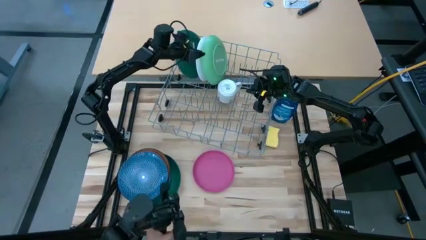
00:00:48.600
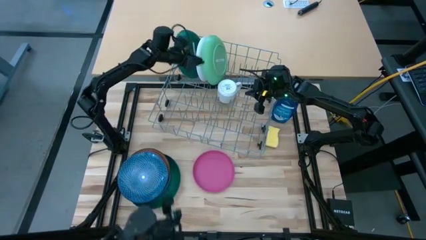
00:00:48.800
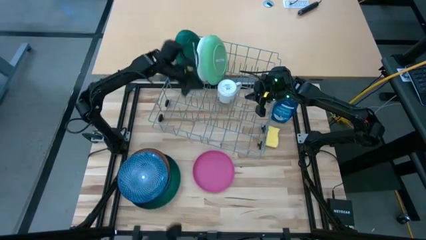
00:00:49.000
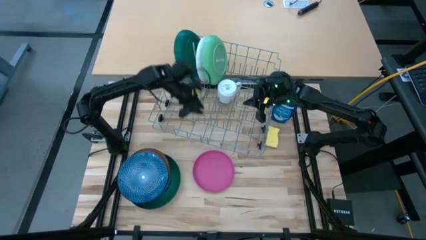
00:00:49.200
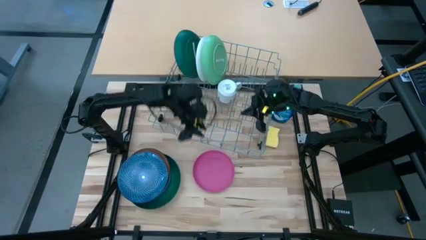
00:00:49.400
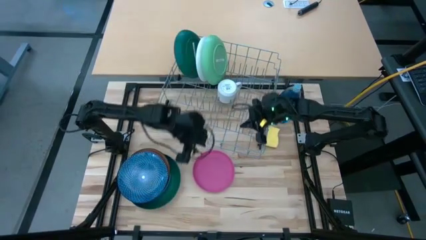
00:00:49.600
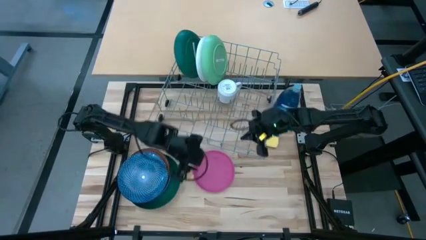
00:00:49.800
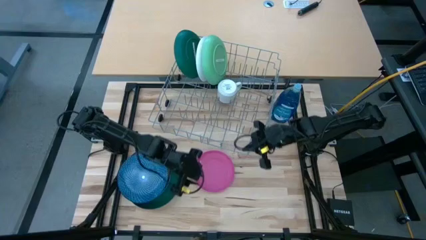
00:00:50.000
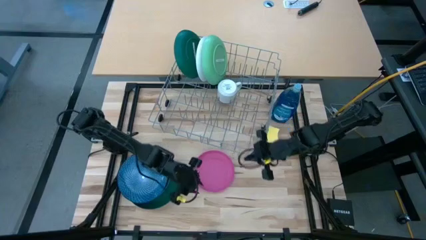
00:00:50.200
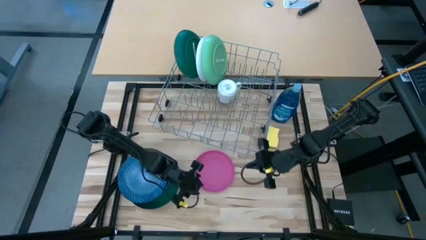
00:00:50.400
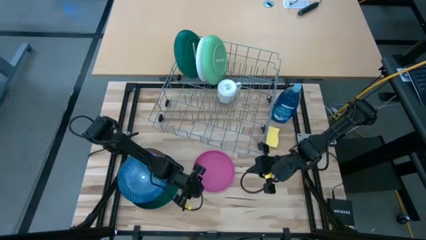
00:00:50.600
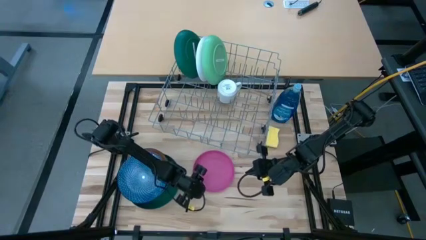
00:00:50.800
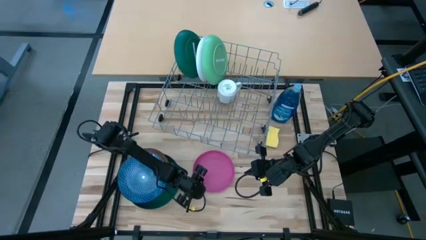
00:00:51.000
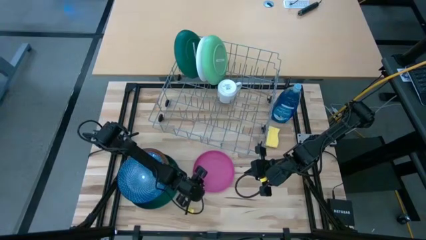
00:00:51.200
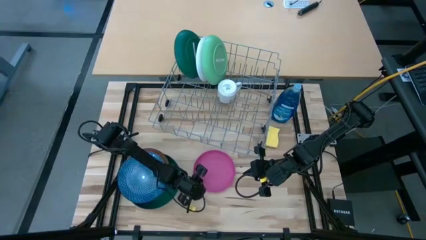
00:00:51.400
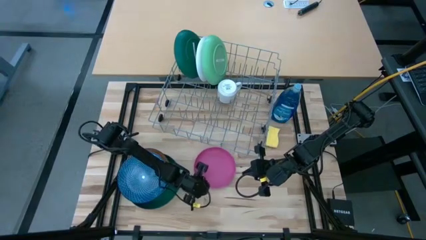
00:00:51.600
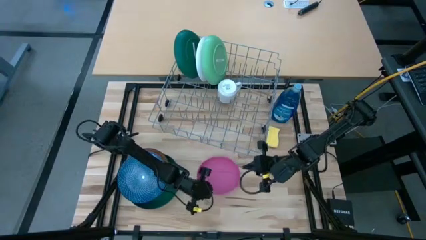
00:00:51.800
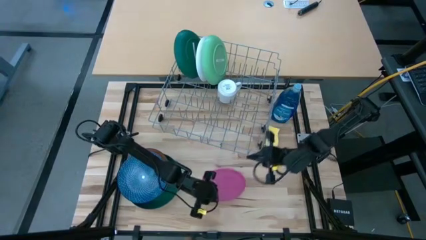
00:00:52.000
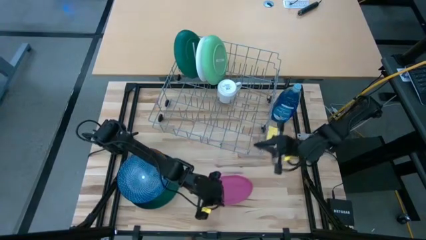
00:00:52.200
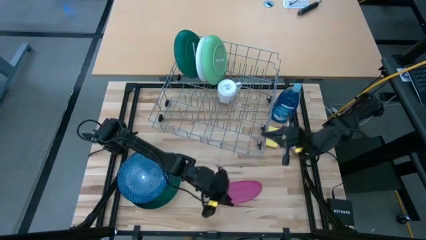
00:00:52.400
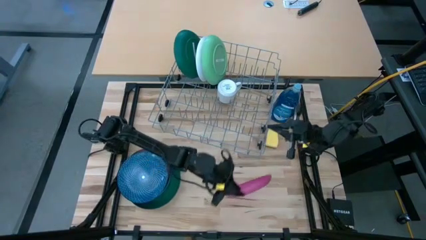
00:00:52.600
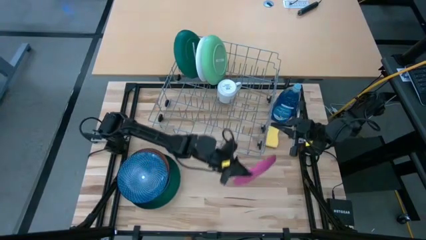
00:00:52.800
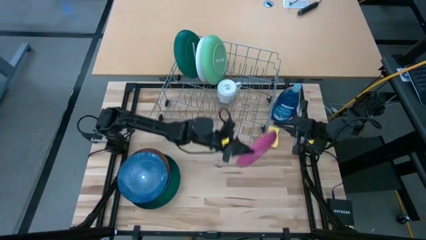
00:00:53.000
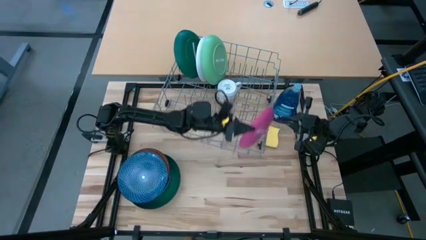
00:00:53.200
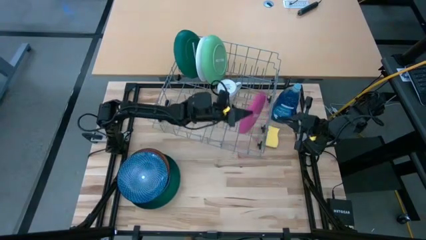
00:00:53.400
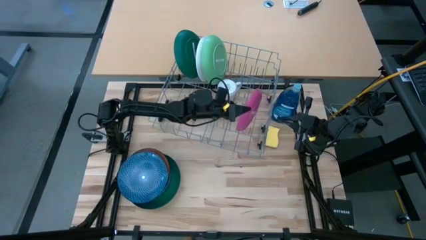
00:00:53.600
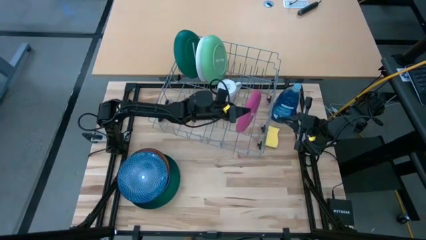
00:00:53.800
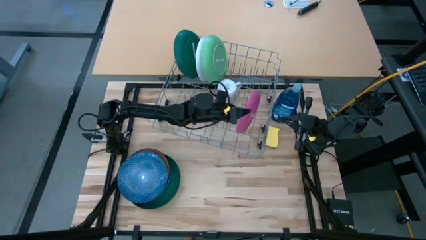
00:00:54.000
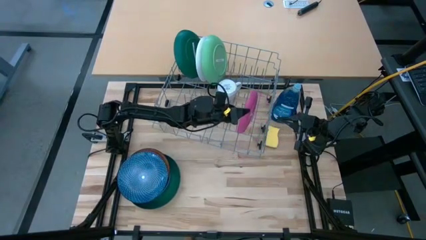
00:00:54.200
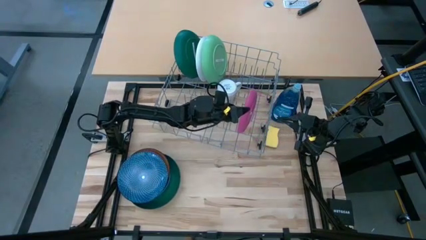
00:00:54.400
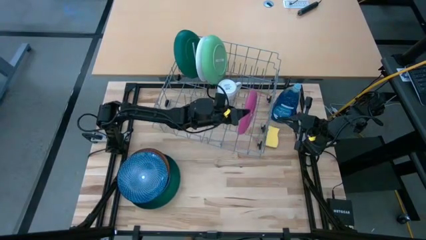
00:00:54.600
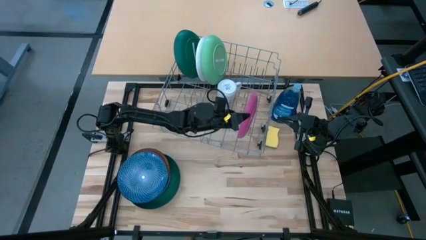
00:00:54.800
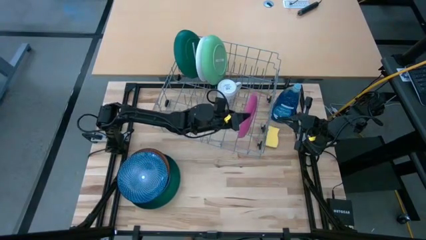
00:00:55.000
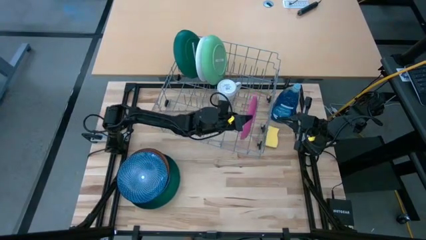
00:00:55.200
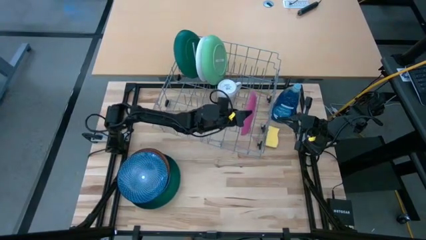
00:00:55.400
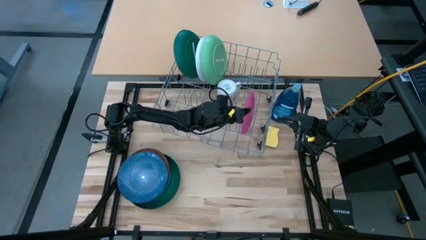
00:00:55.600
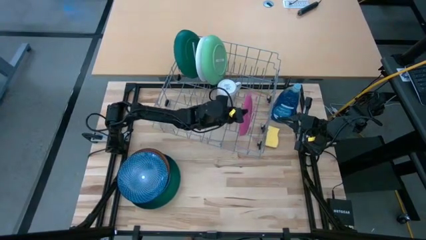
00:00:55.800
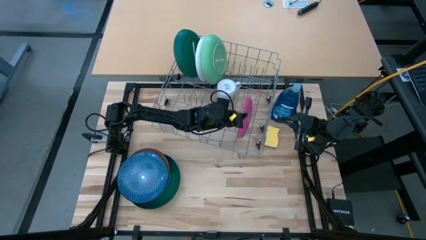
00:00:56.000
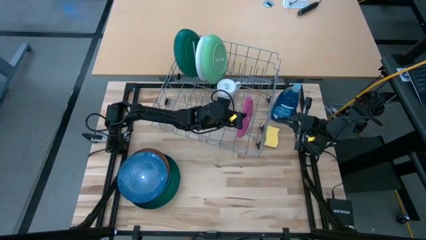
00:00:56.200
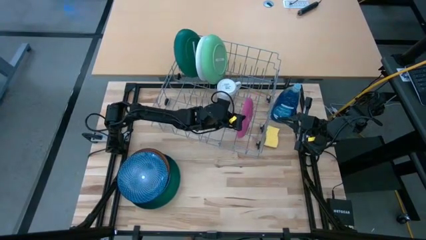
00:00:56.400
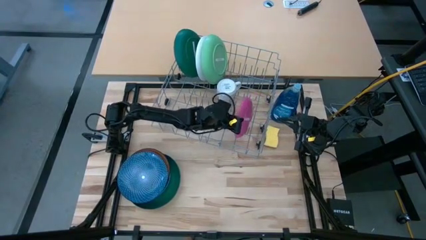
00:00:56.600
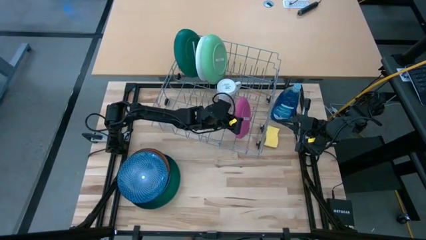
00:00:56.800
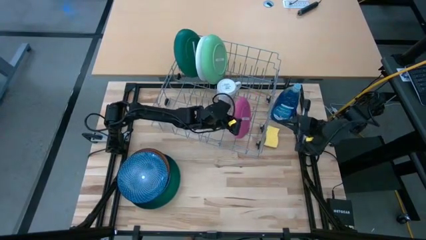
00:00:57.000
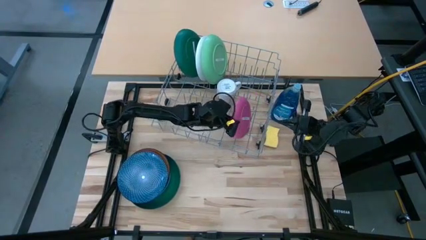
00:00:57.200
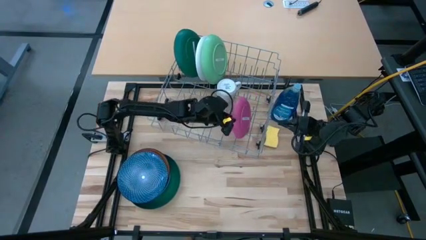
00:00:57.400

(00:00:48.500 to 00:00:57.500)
Task: Sort dishes
Put the pink plate in the dish rack

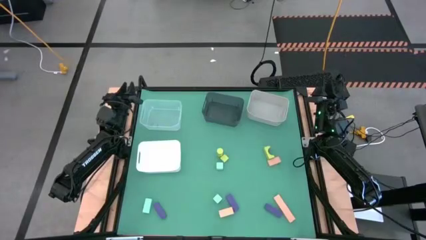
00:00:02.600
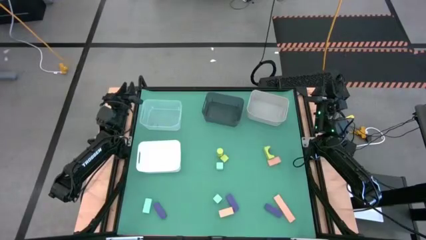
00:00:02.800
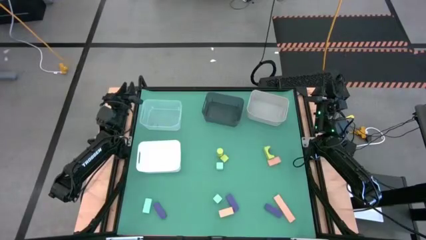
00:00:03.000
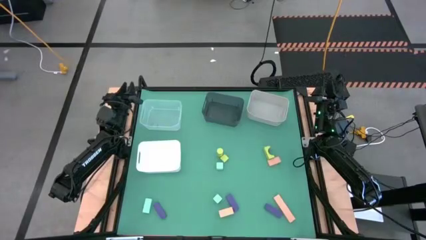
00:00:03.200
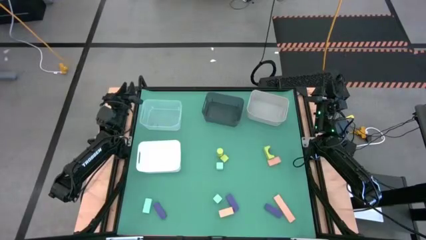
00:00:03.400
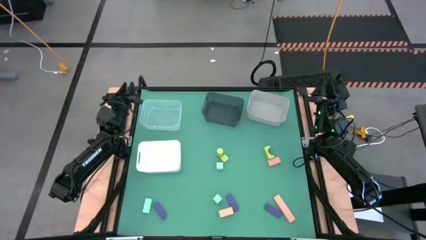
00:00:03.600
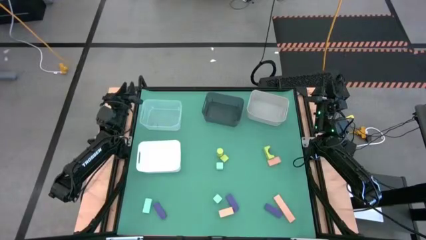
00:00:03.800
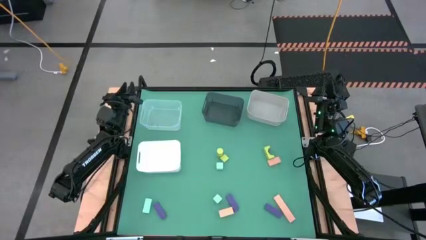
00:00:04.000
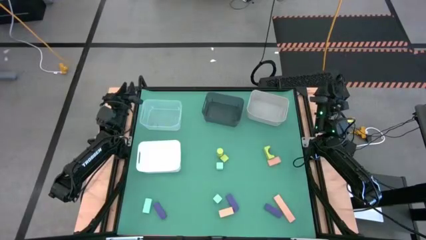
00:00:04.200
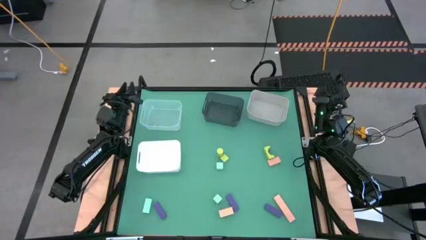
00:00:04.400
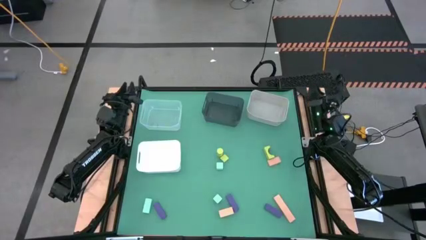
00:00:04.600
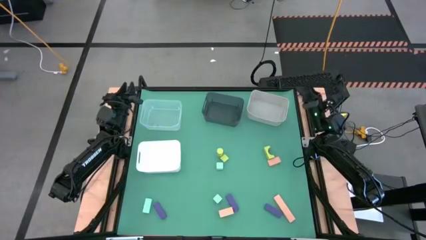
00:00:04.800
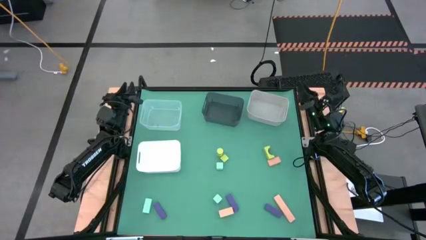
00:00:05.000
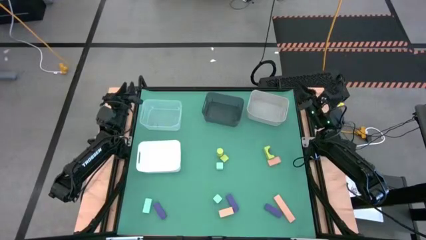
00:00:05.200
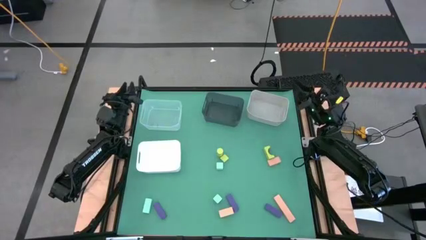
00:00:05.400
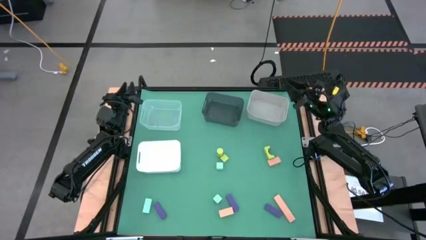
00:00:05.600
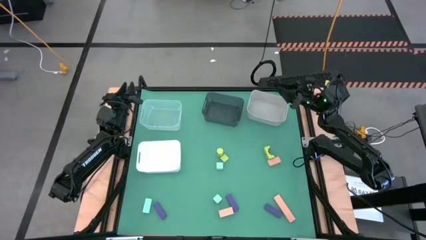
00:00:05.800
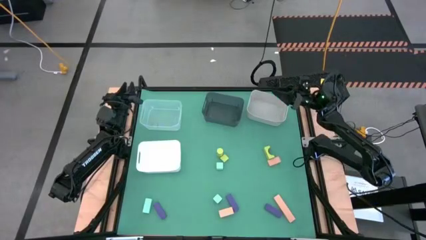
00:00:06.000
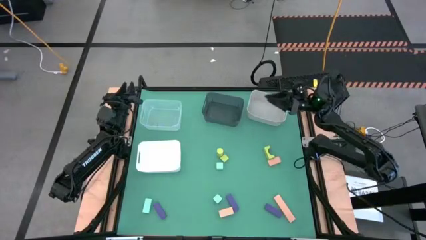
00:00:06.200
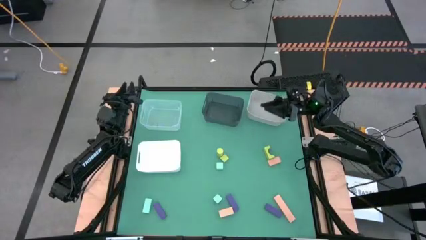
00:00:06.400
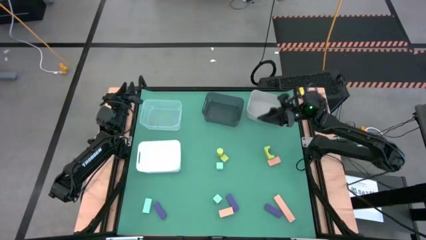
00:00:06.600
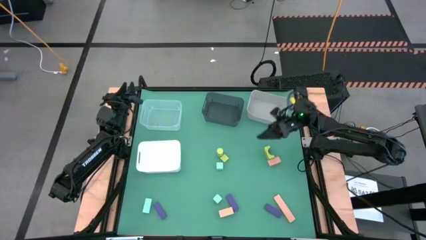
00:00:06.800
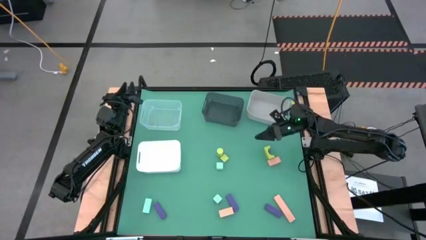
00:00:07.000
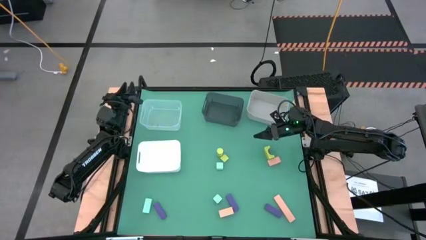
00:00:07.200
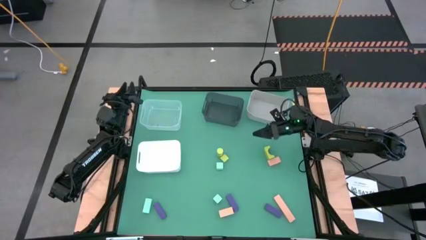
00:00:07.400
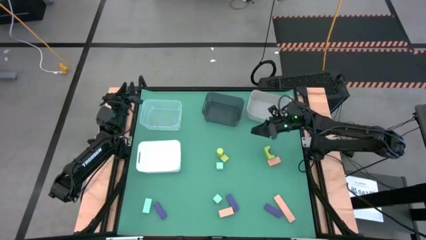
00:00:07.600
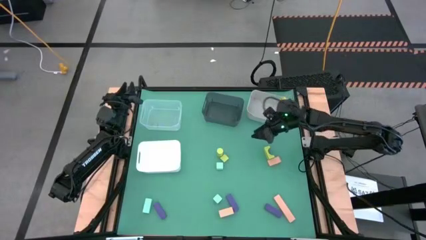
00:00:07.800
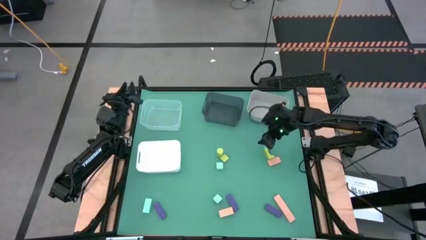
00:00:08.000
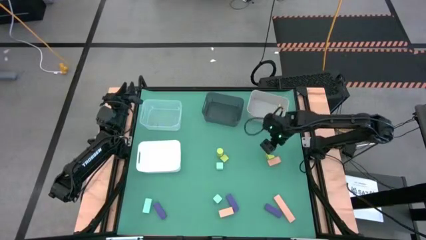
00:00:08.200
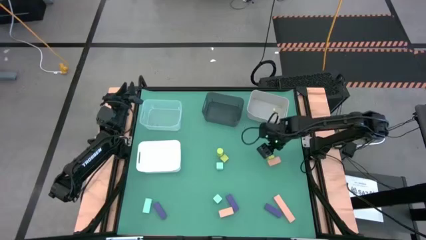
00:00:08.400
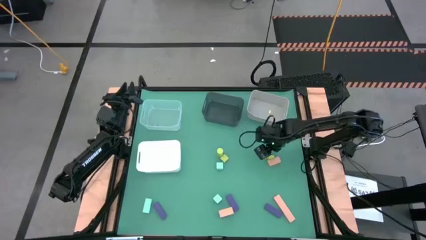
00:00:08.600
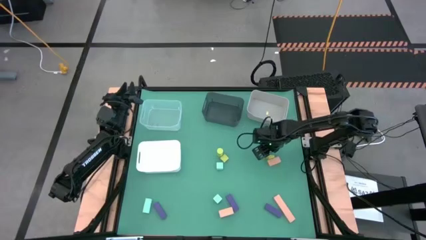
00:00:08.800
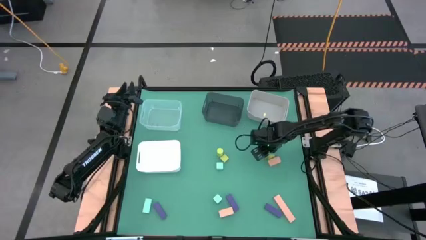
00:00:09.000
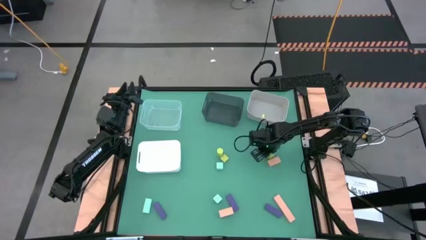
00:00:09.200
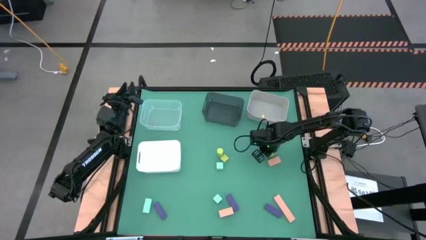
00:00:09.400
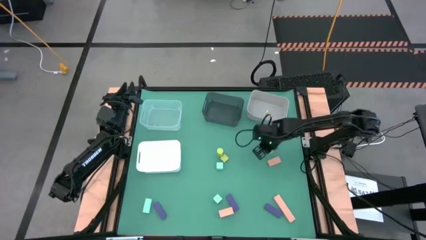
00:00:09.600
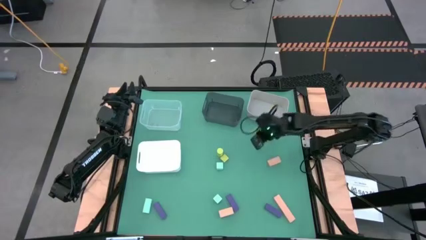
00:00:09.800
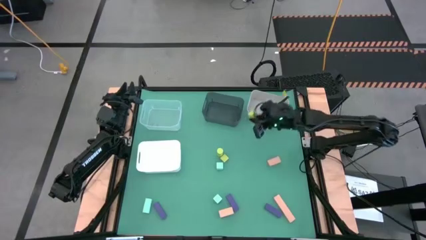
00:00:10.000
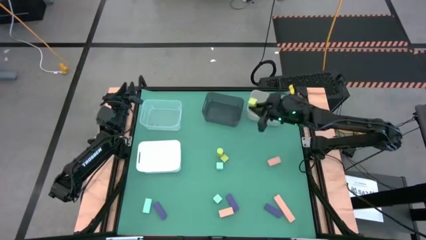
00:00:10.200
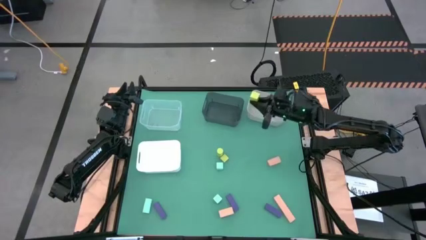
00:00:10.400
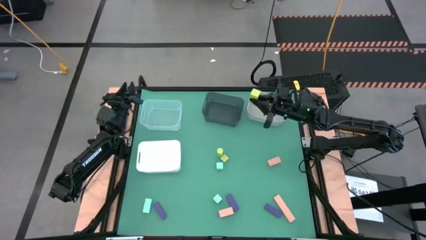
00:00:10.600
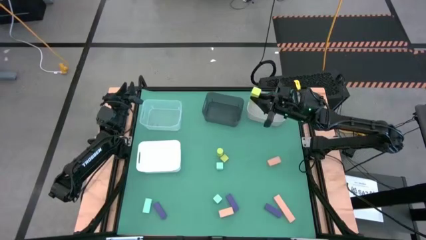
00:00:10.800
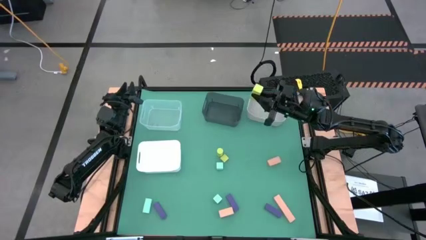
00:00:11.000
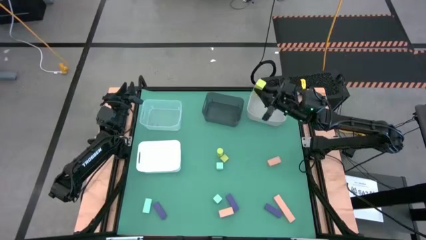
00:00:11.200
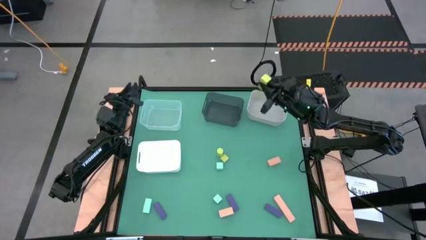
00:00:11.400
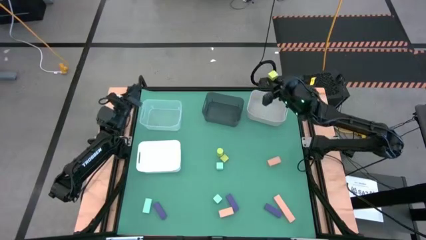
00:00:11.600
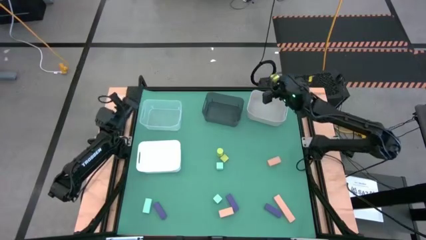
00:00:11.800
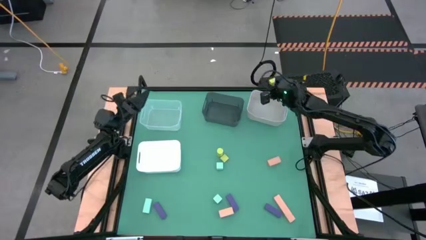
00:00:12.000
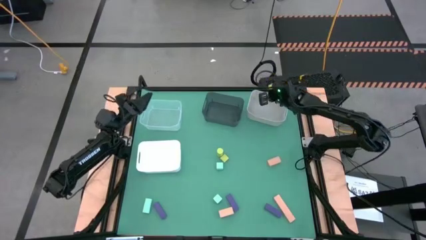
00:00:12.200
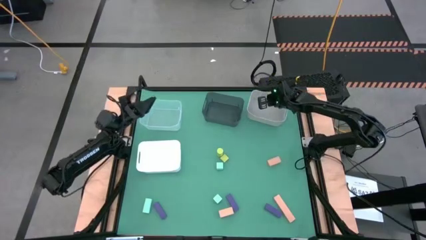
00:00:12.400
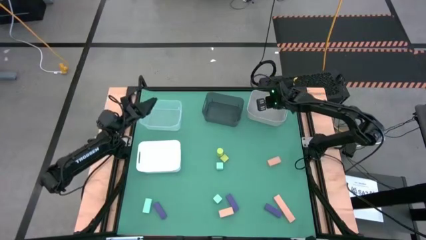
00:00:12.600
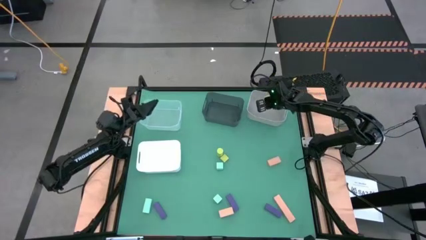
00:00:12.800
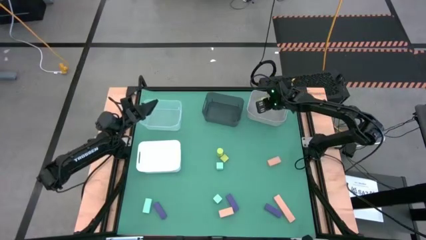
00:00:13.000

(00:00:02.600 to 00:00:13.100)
Task: Sort & place blocks by color
Put the right green block into the gray bin
